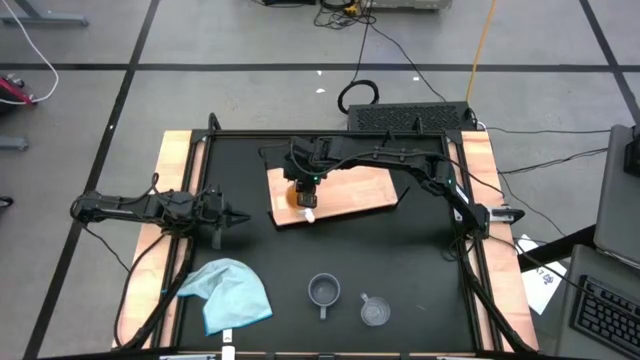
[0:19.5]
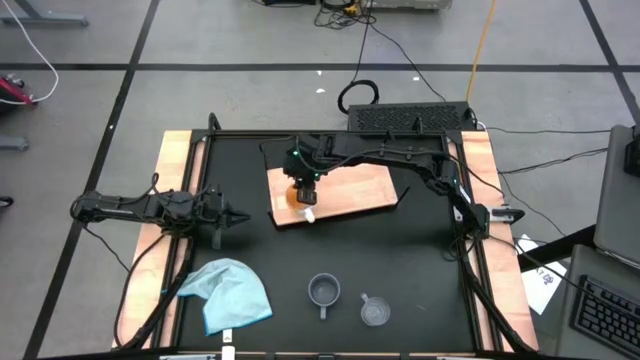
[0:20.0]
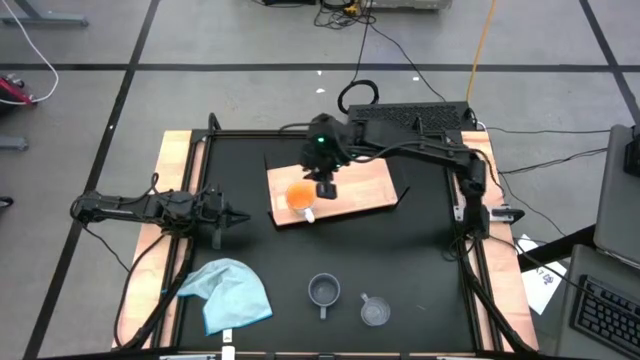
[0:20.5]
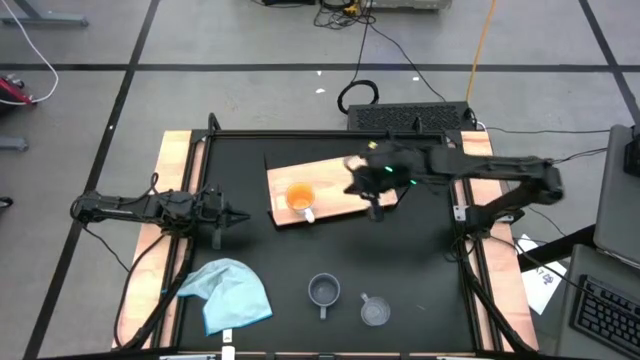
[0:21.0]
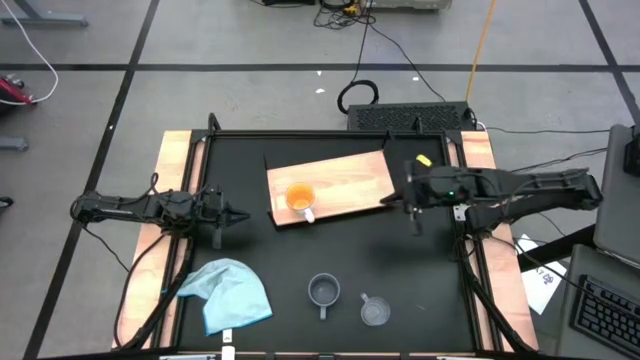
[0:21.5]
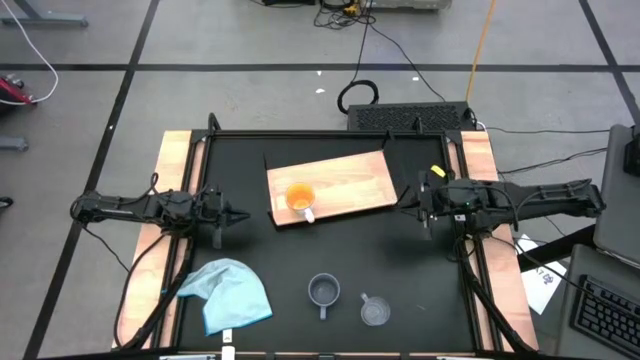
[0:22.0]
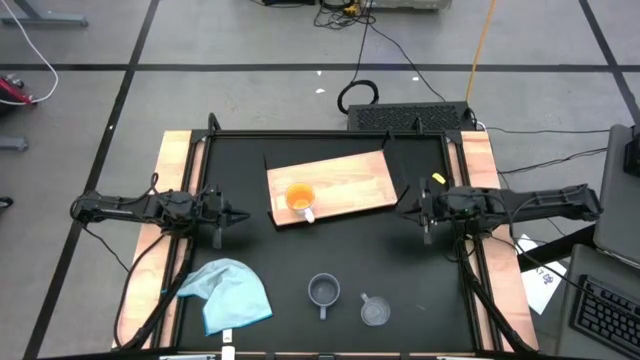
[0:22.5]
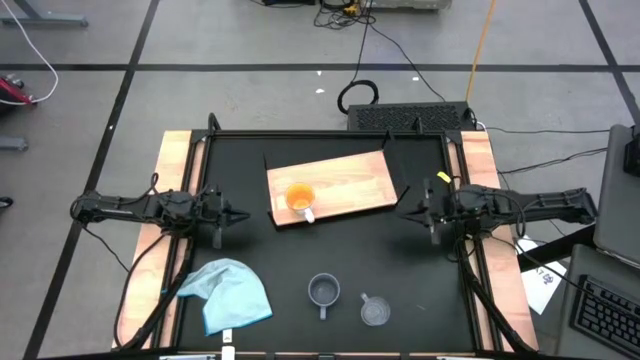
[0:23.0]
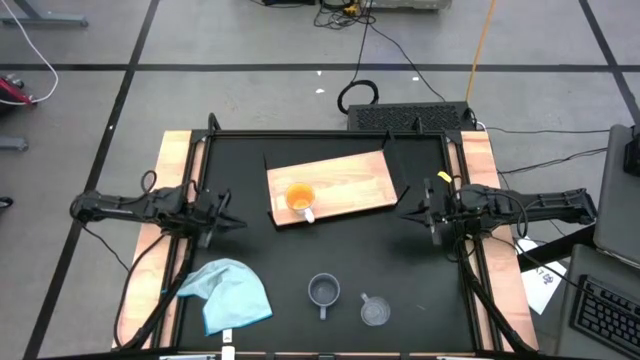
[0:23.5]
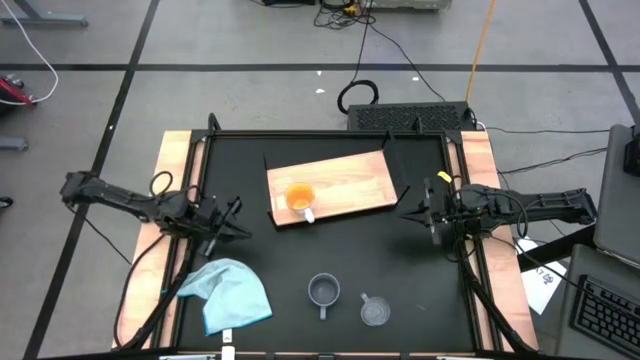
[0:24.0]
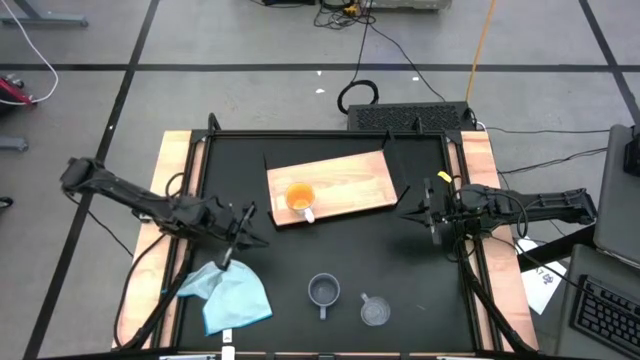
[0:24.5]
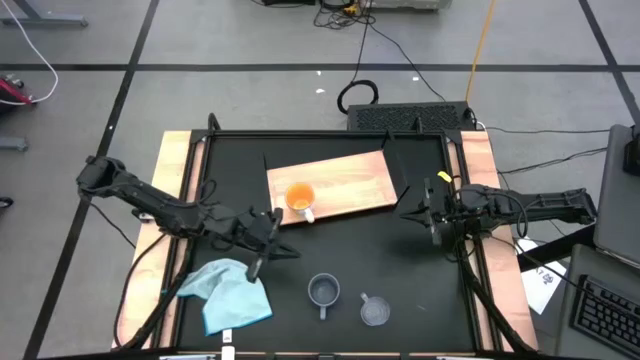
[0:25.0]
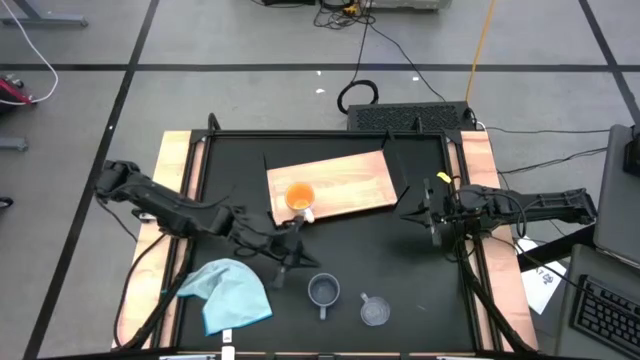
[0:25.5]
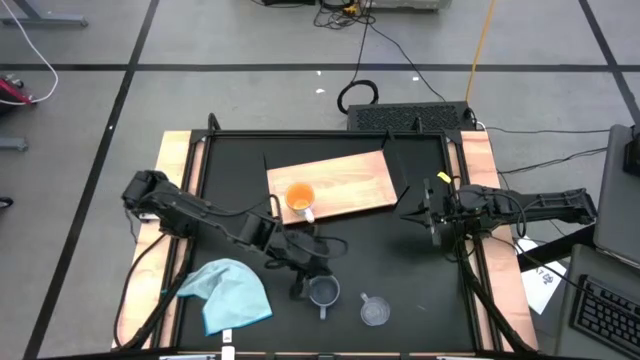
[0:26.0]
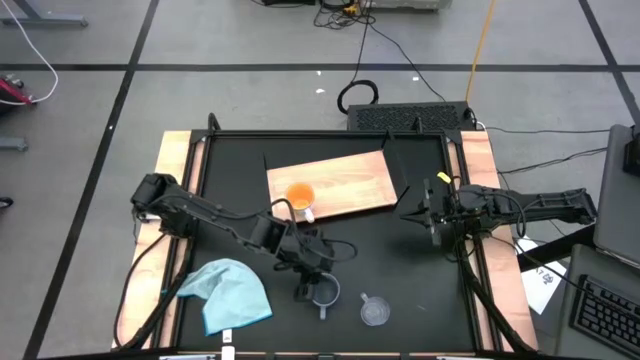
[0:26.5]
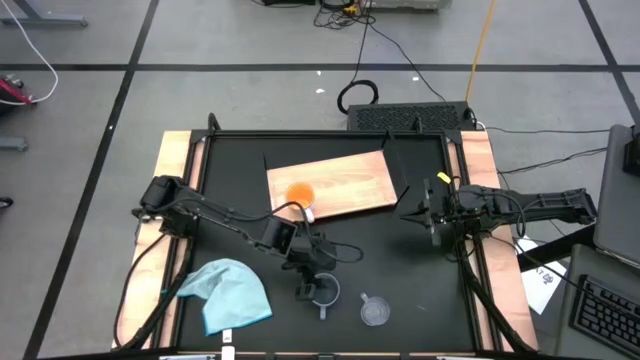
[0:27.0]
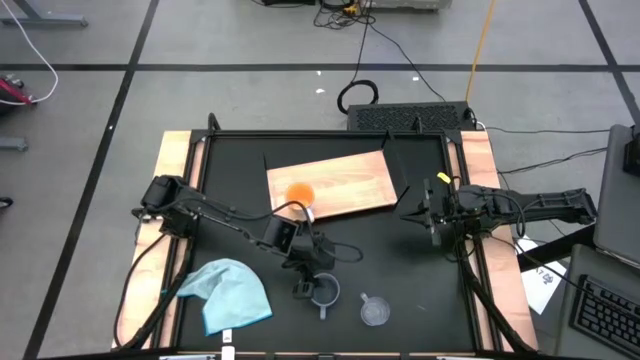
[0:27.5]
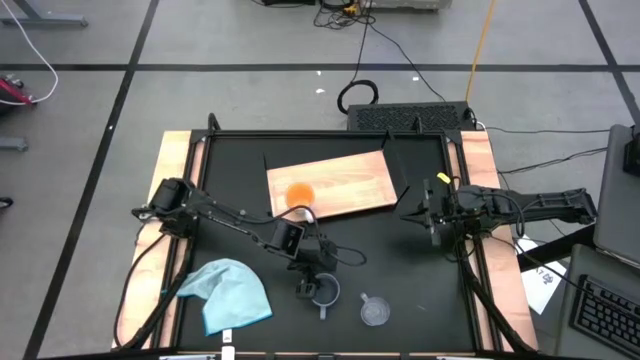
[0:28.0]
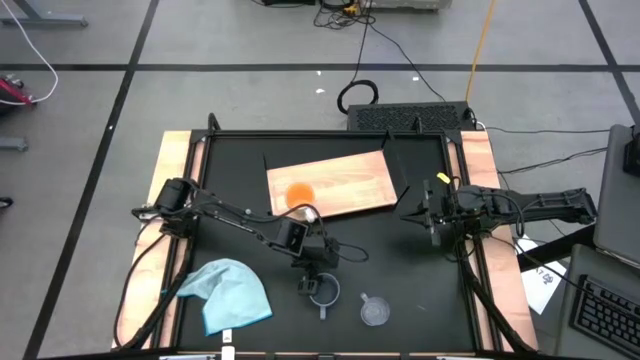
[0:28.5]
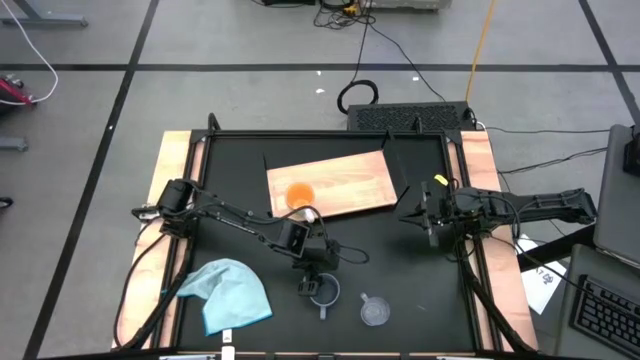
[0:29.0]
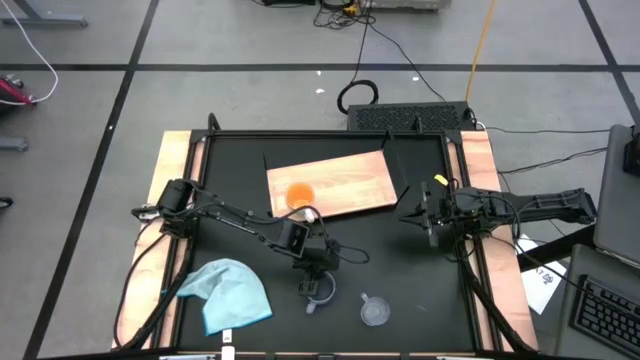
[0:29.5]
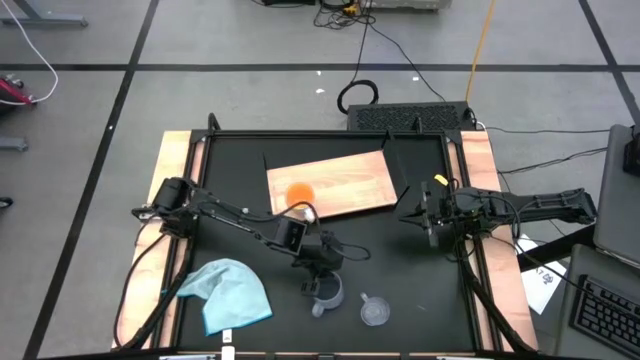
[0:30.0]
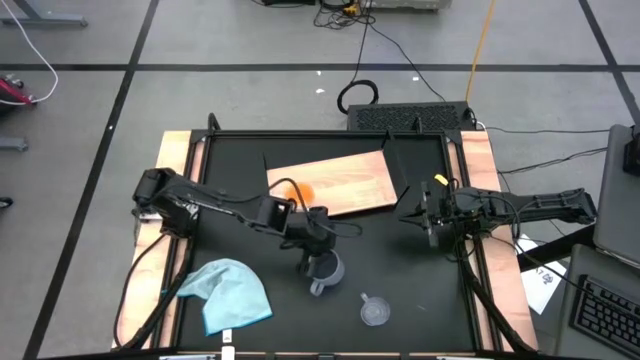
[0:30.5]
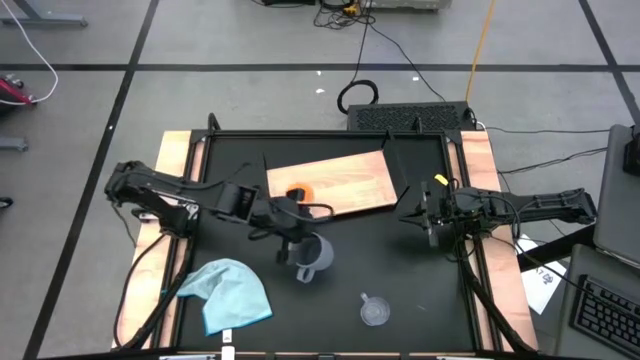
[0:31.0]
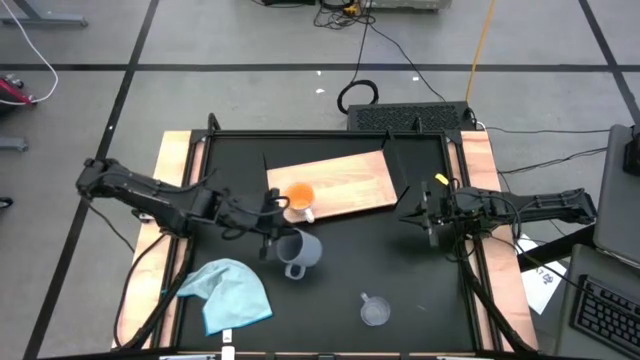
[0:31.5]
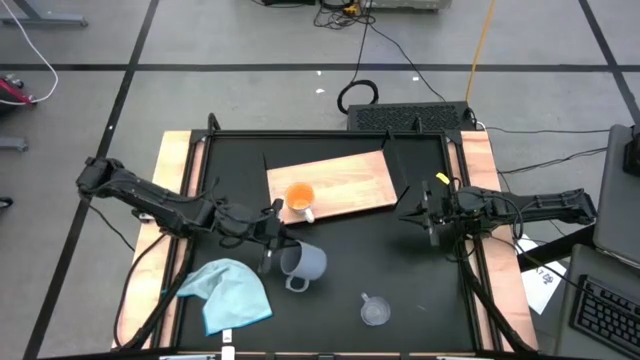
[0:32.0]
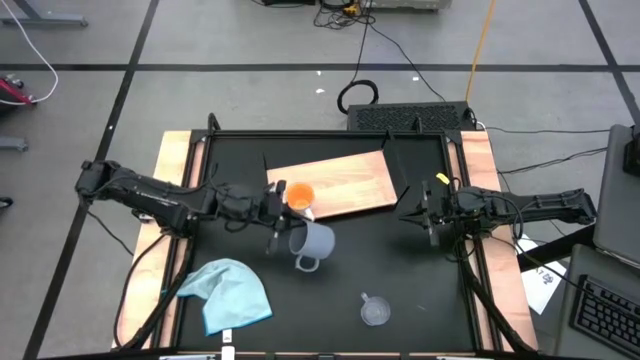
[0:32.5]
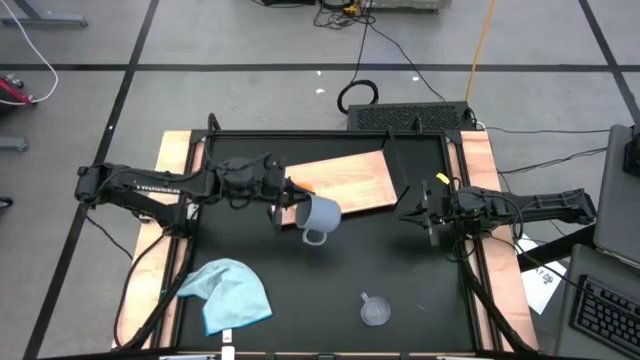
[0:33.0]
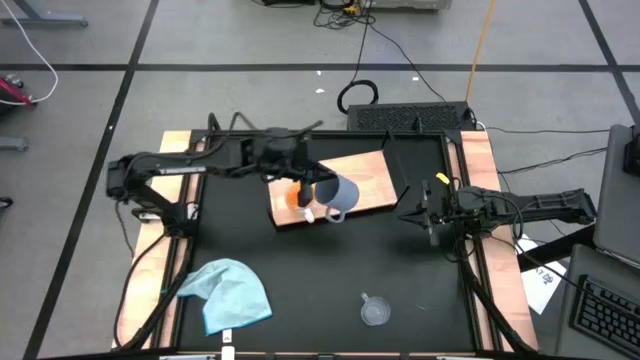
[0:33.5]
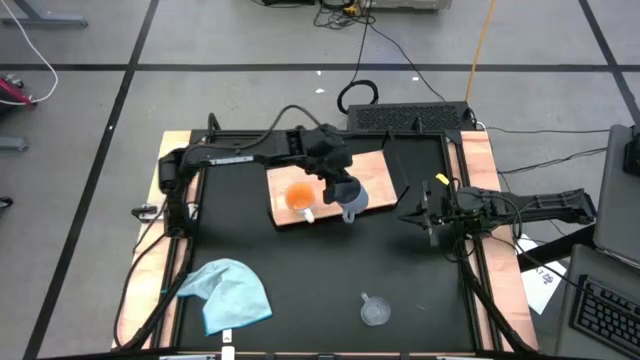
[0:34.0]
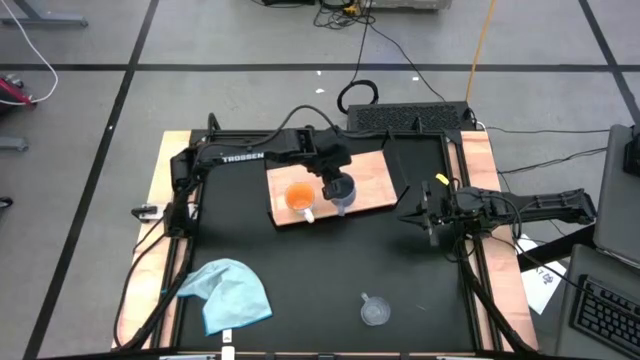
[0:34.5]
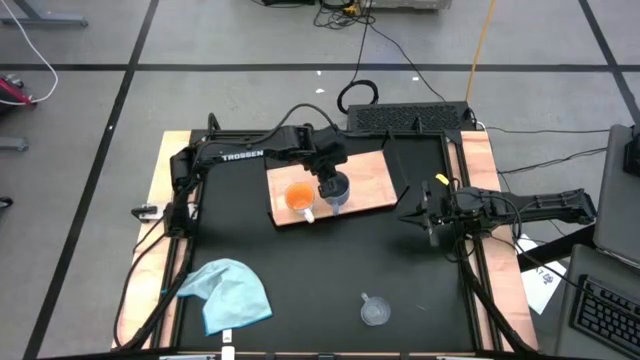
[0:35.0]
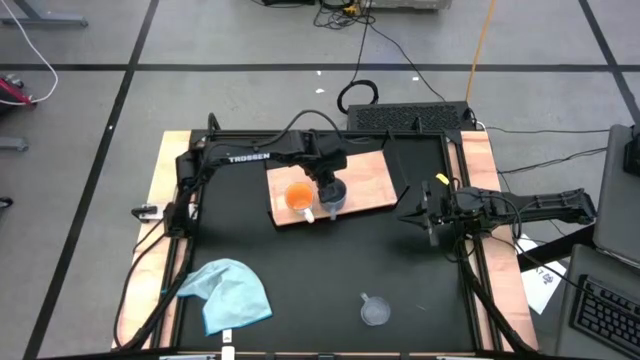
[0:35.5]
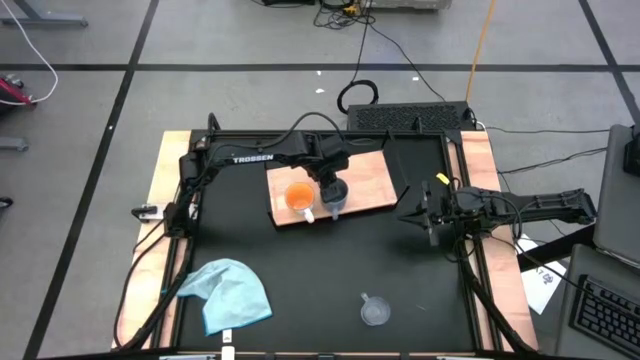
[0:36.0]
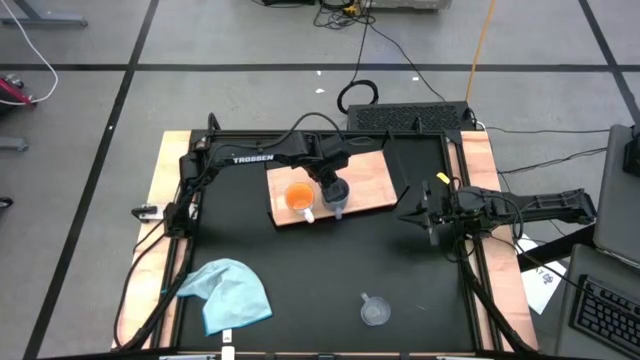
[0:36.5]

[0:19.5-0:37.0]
Task: Stack small to large cups/mugs on shelf
Put the gray mug on the shelf
